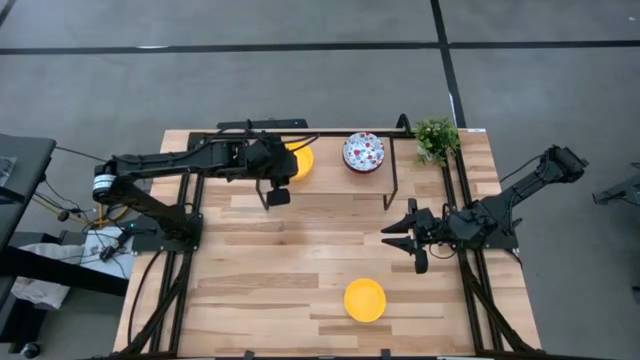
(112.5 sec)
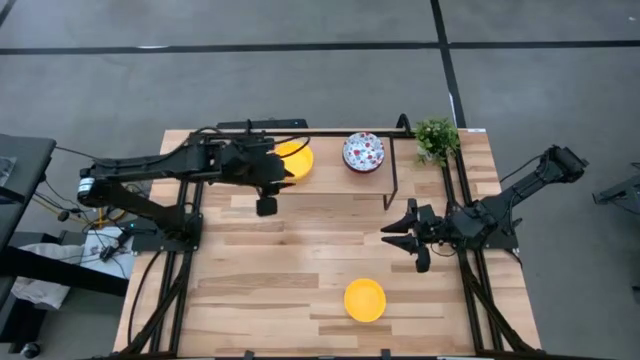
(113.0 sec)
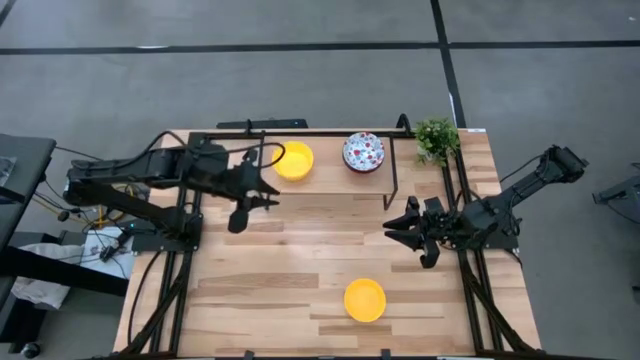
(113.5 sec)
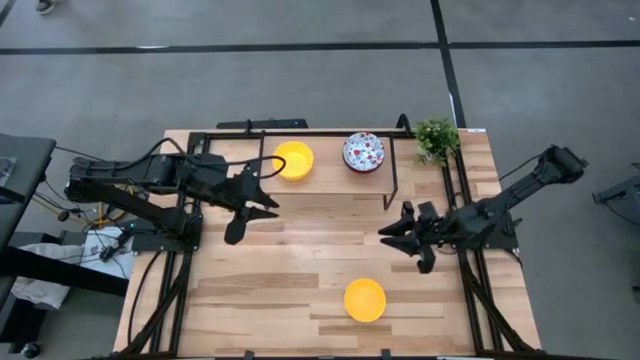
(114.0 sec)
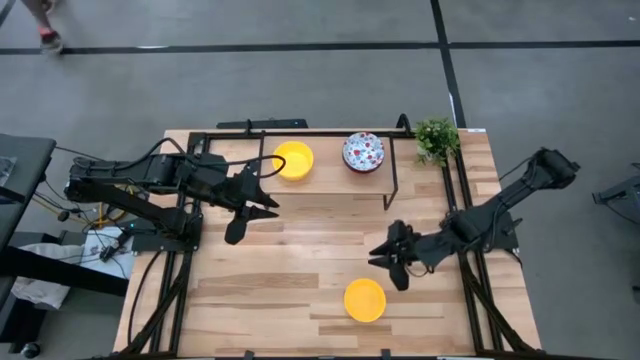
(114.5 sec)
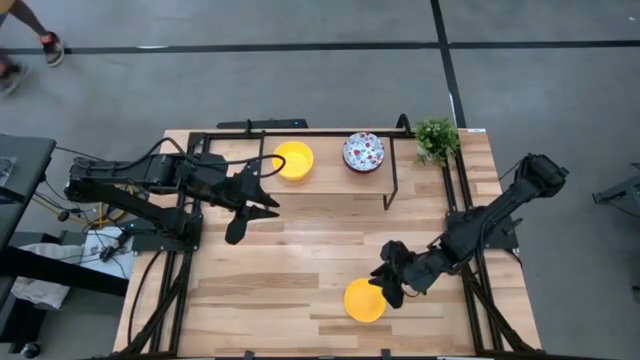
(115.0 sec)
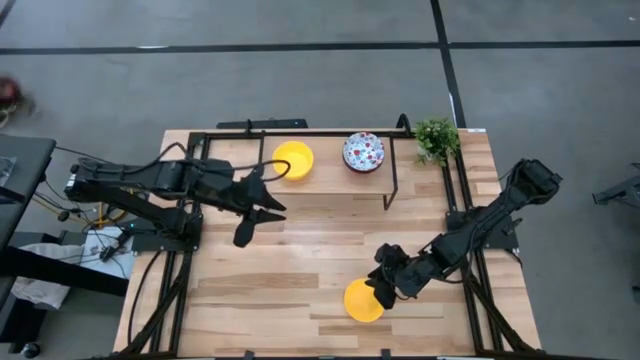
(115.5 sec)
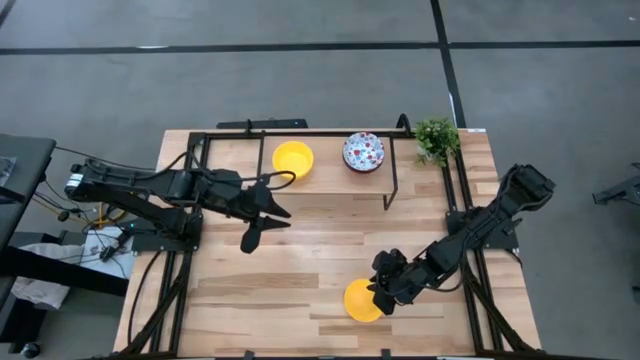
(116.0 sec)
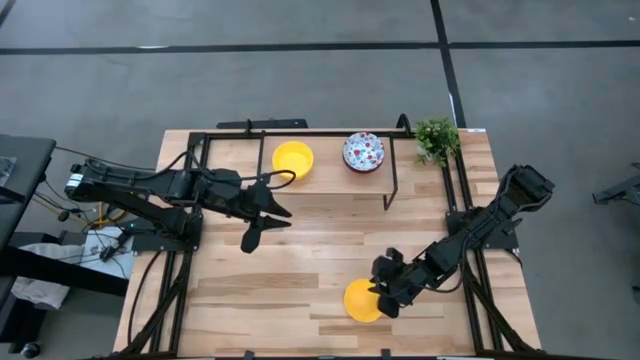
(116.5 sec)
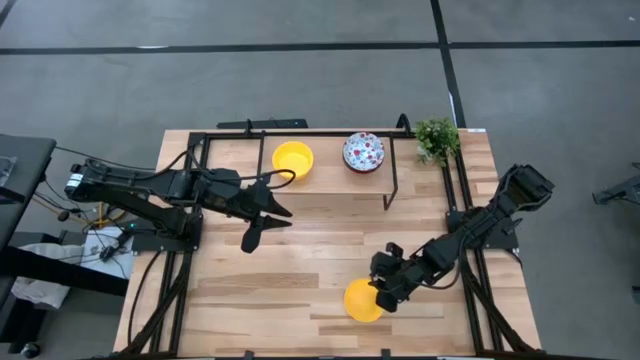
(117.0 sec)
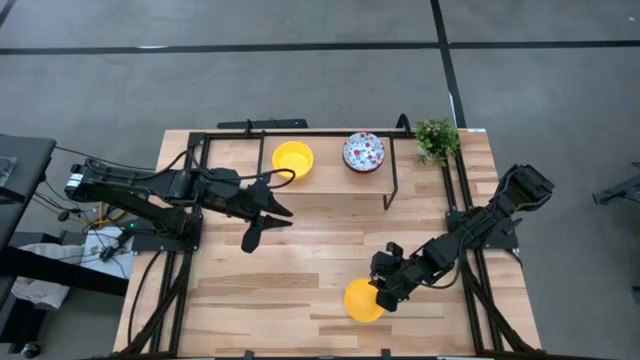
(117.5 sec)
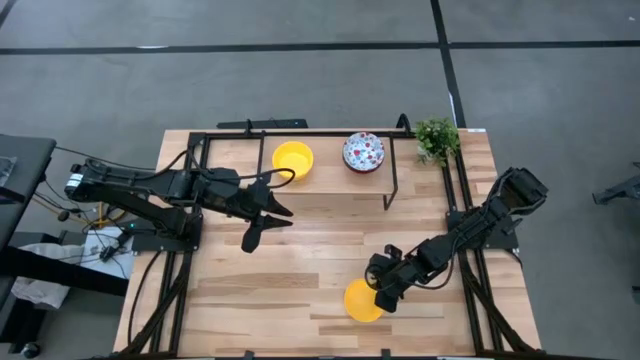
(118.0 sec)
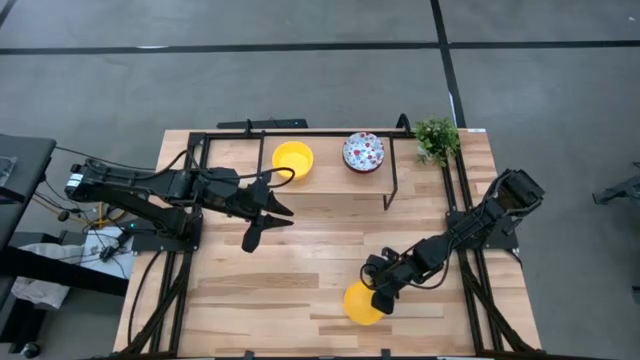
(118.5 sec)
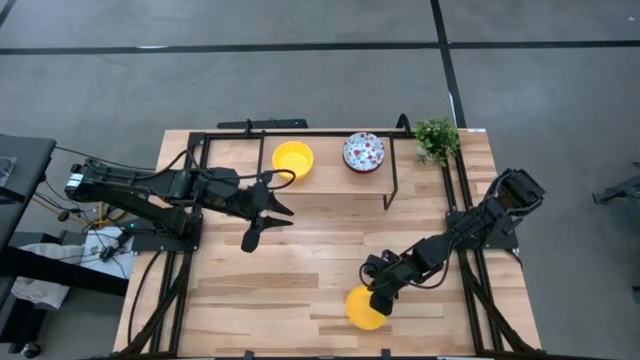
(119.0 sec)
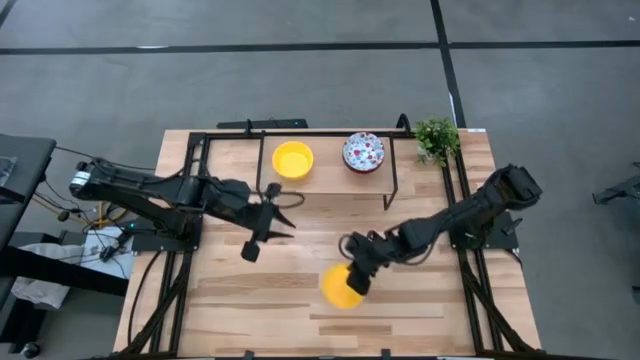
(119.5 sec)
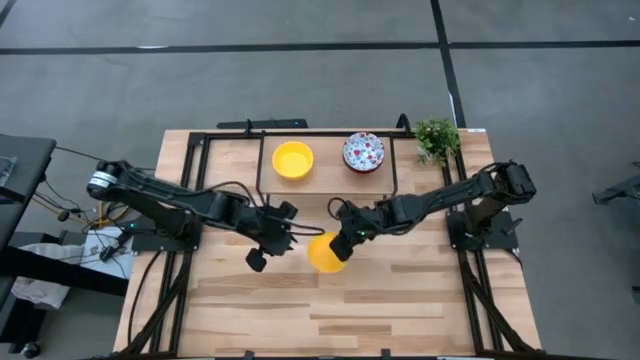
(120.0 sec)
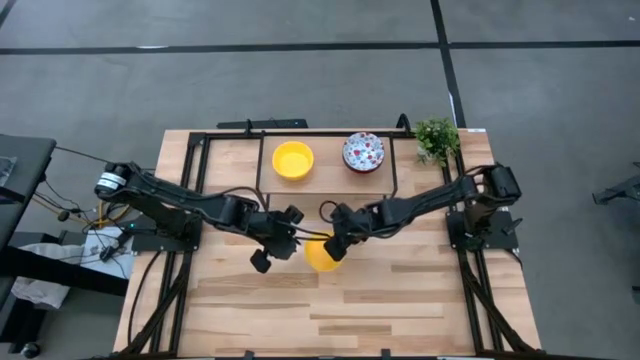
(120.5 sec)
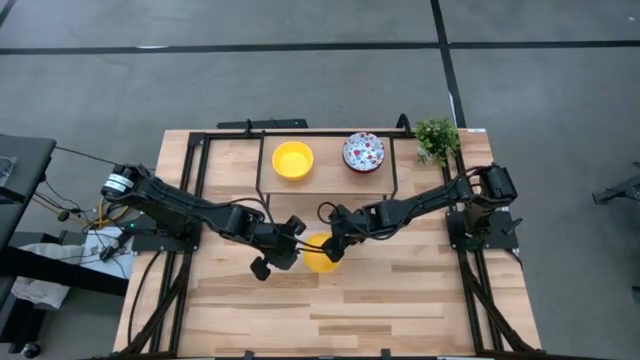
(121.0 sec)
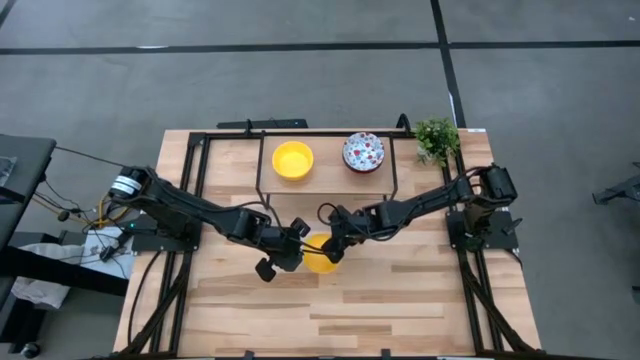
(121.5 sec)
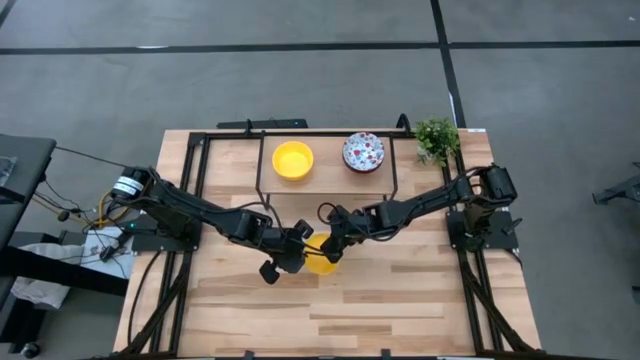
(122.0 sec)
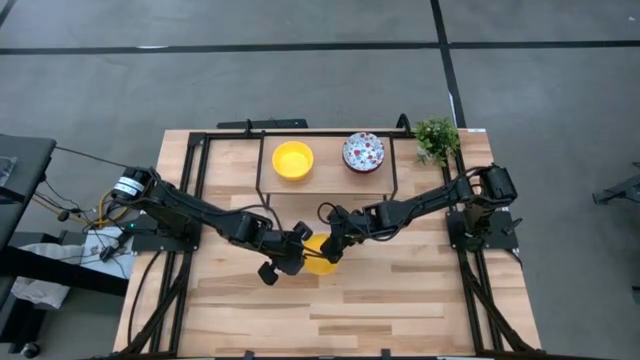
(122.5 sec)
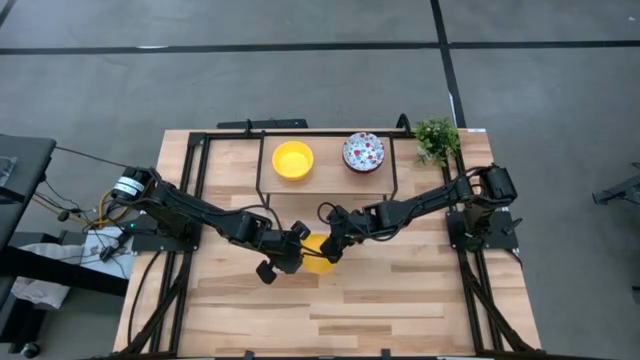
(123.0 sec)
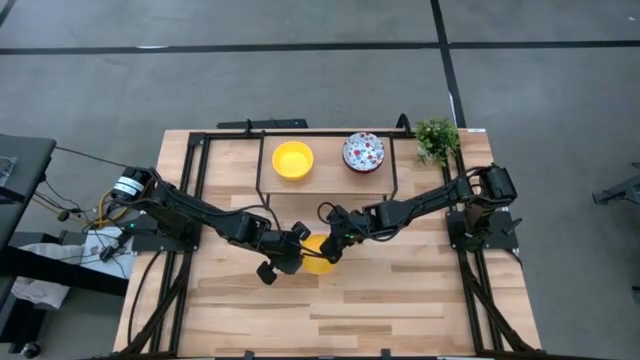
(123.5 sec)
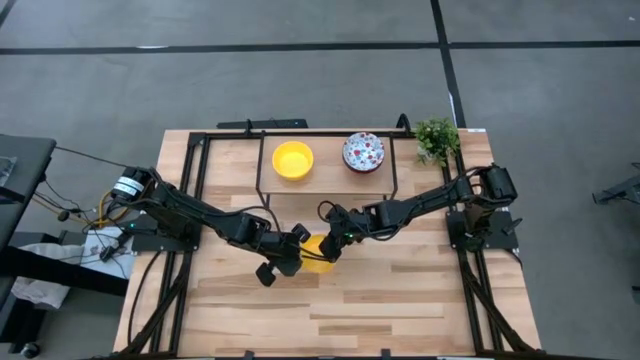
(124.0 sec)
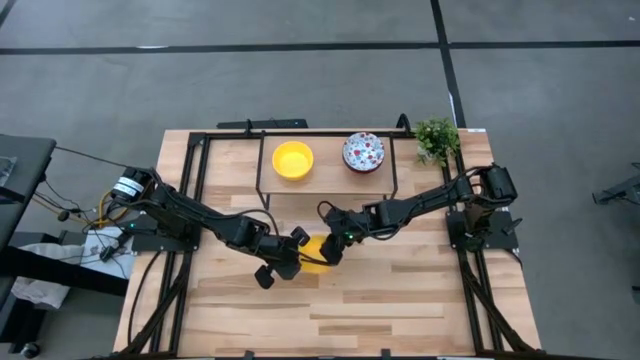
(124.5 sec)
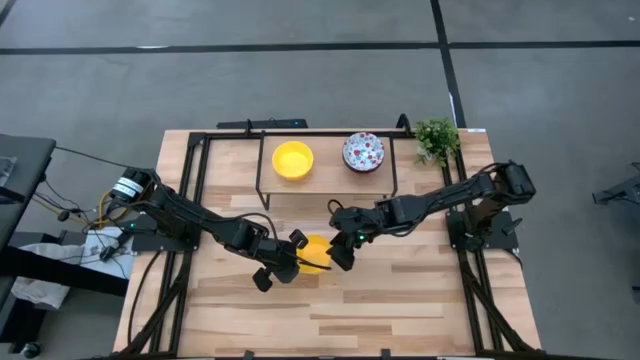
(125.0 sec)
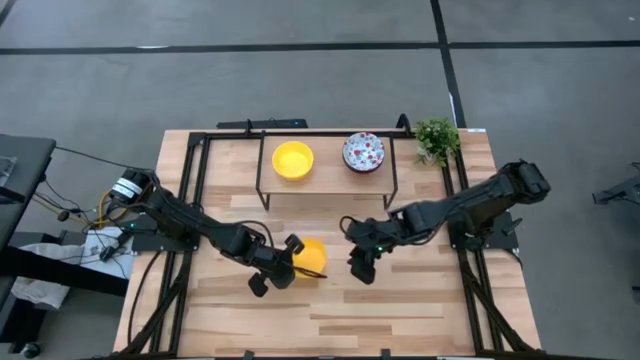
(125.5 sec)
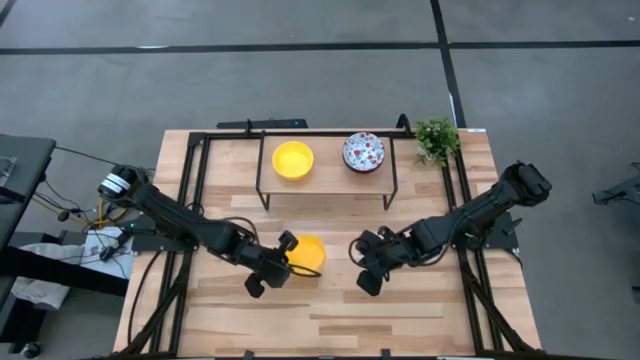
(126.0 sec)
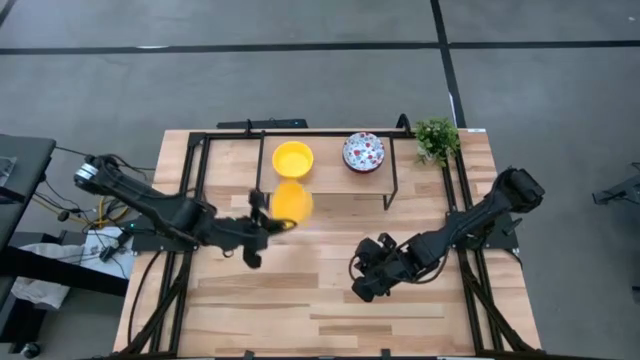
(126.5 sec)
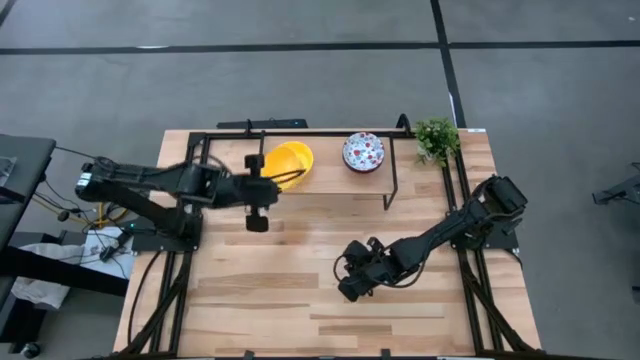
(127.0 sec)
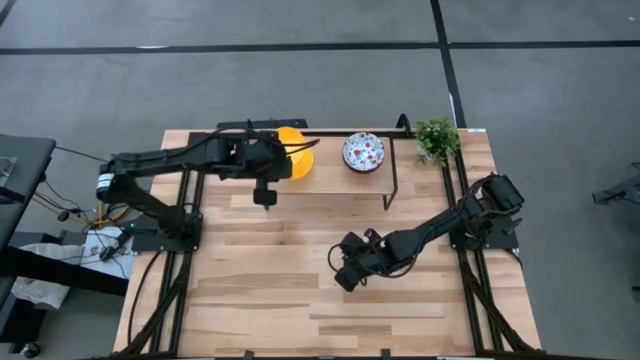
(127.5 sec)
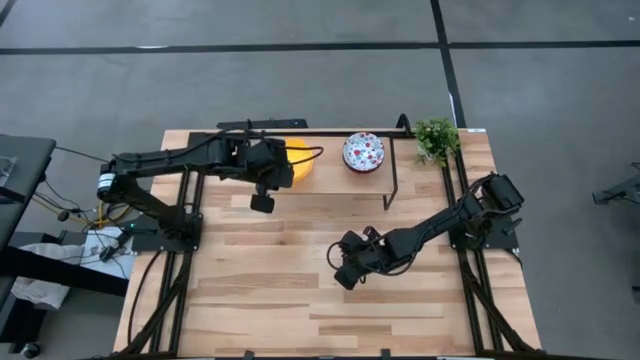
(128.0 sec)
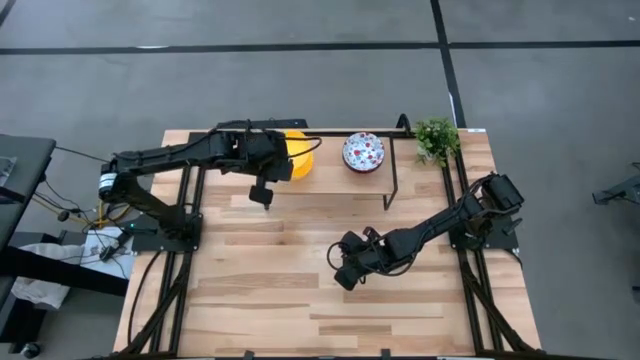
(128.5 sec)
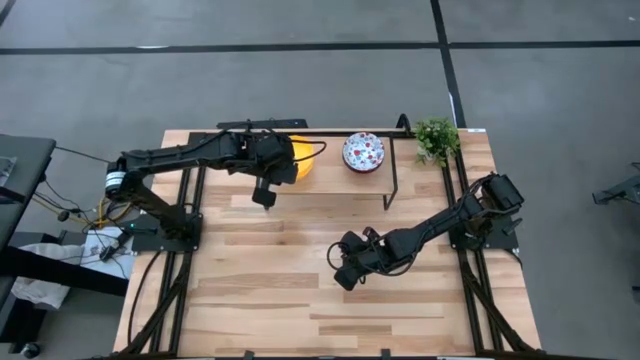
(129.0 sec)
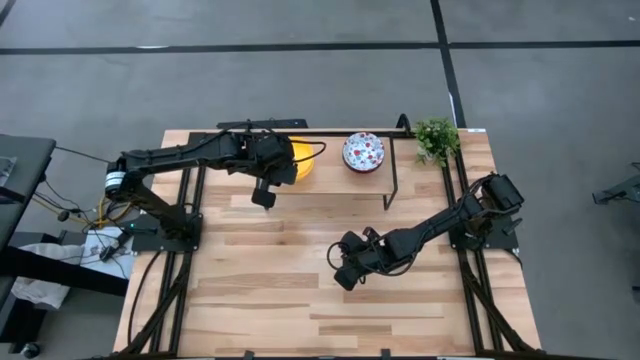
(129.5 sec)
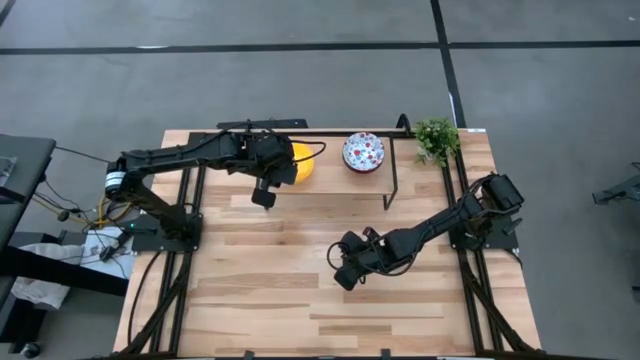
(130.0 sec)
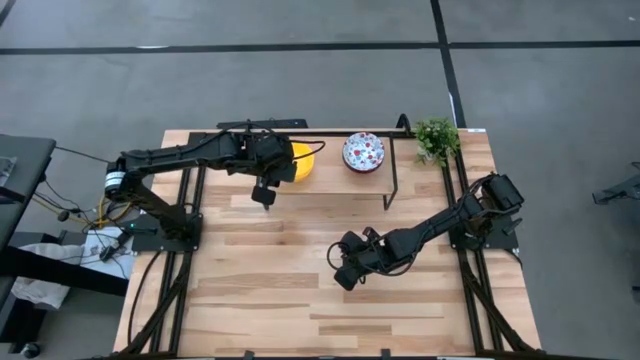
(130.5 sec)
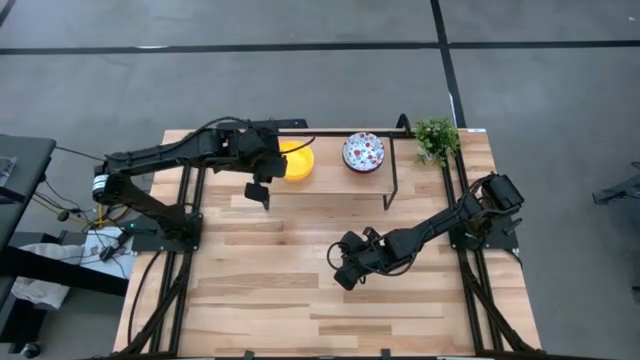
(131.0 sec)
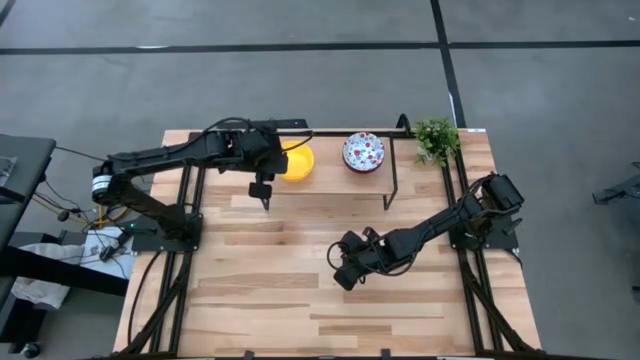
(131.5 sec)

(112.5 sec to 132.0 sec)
Task: Pick & Place Mini bowls
Stack the yellow bowl on top of the yellow bowl on the shelf

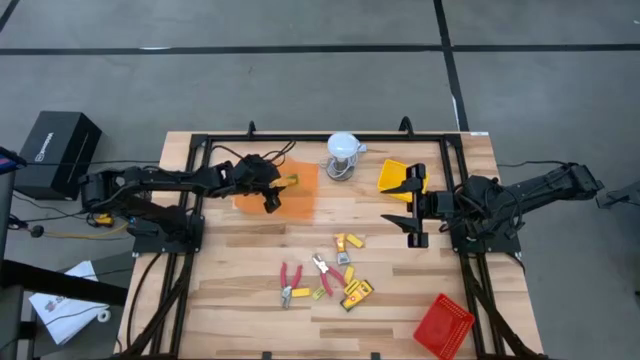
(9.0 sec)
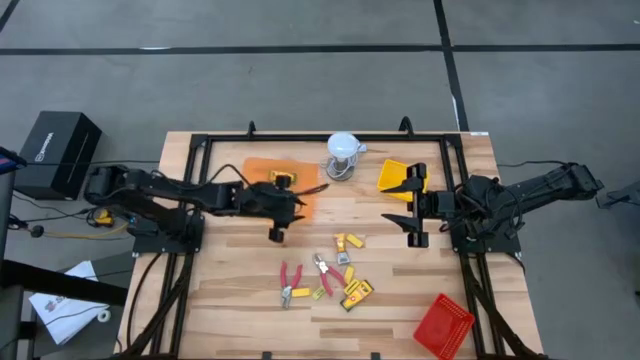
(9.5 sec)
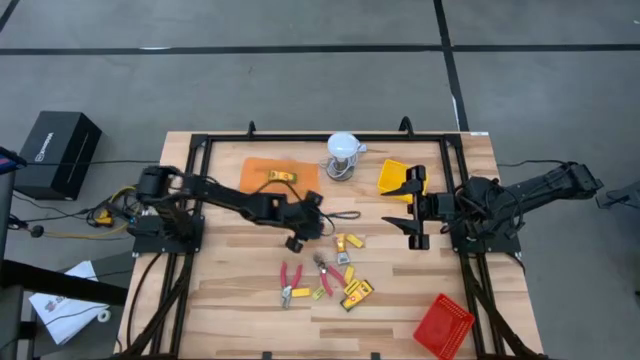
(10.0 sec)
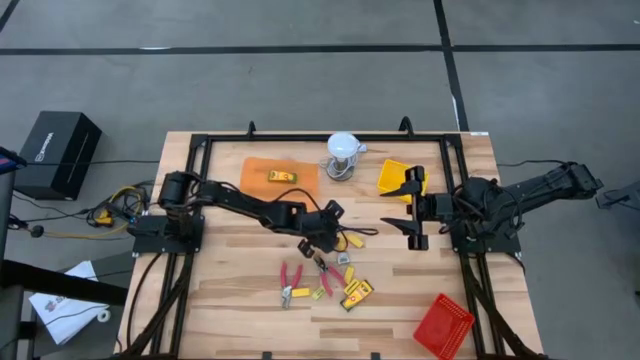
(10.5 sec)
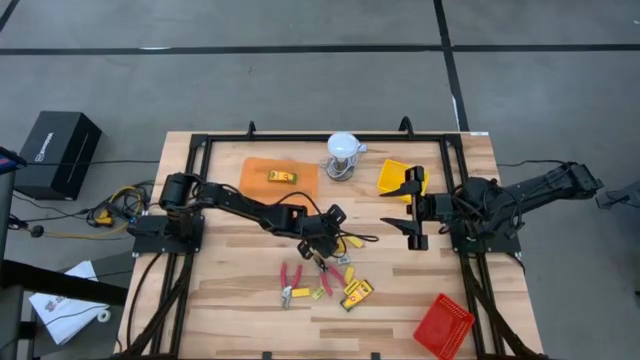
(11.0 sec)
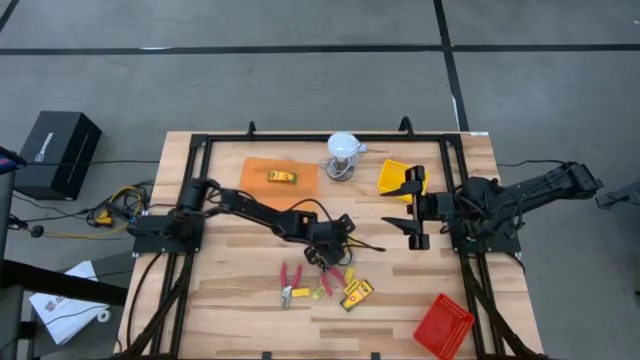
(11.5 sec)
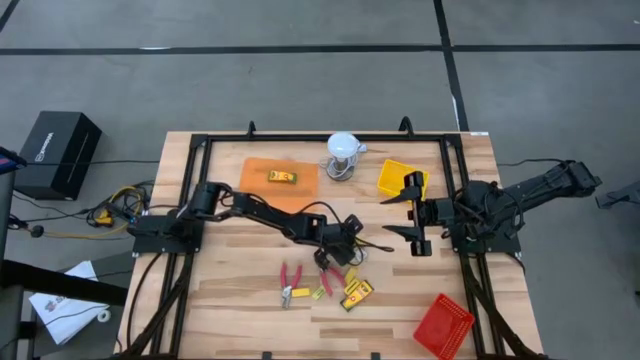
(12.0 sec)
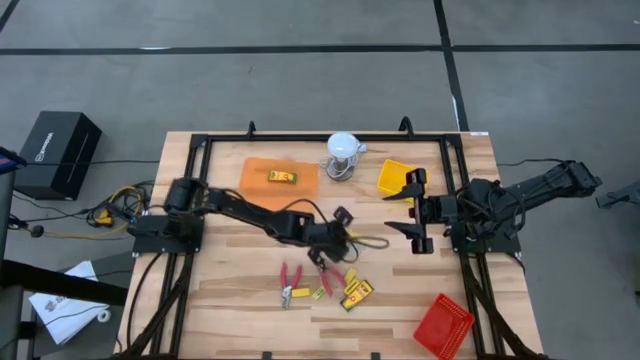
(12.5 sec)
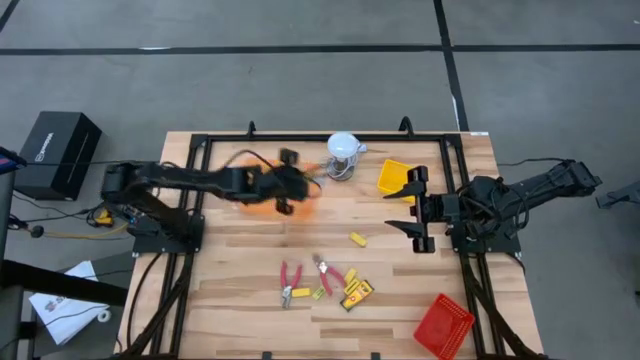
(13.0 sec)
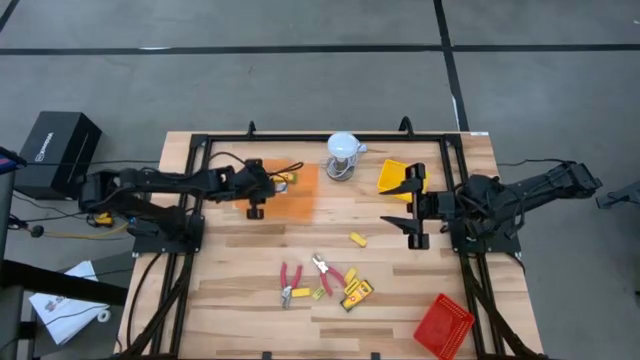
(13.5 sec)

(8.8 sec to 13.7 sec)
Task: Pick & Place School Supplies
Put the yellow crayon pack into the orange bin
